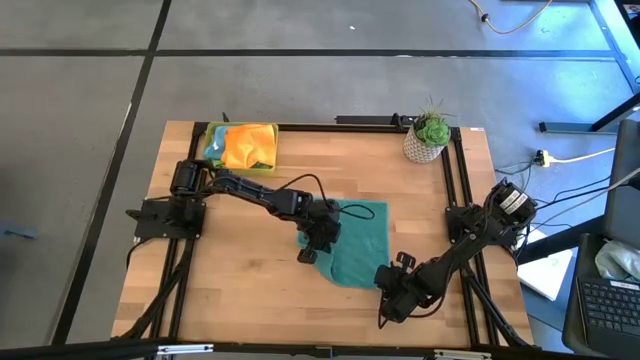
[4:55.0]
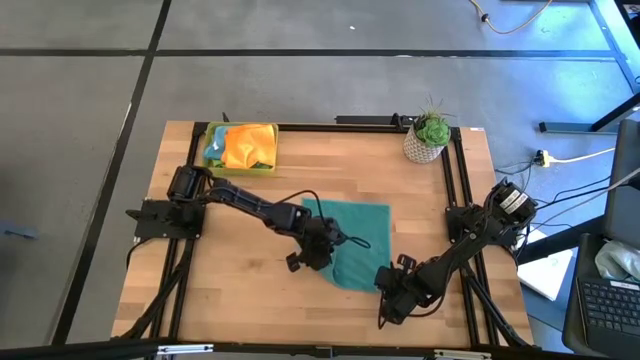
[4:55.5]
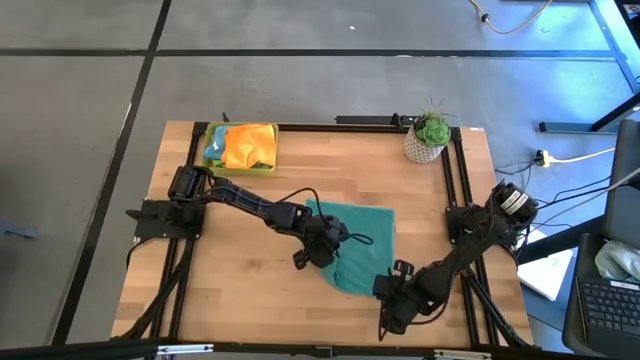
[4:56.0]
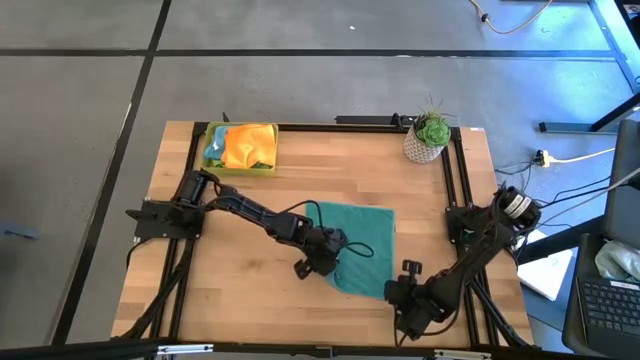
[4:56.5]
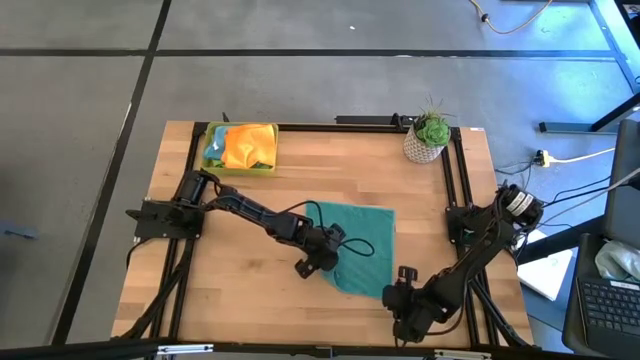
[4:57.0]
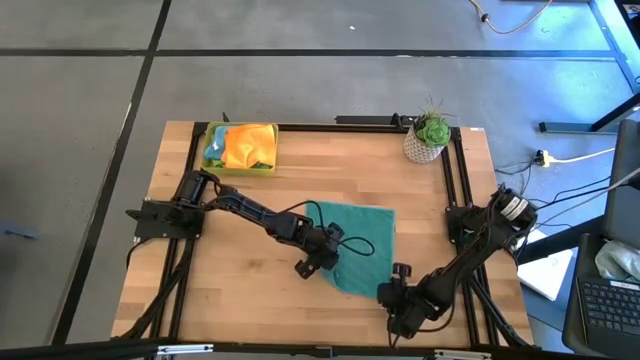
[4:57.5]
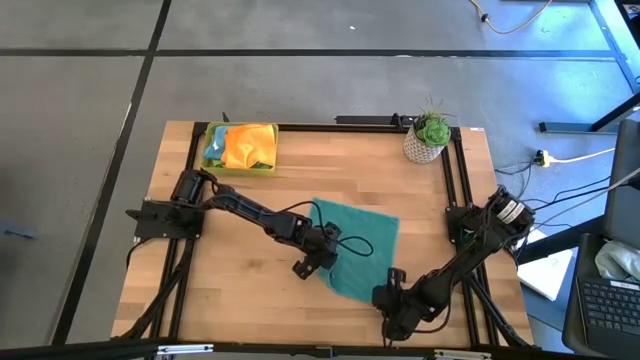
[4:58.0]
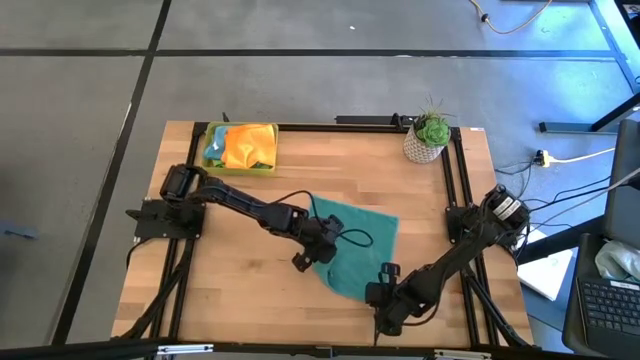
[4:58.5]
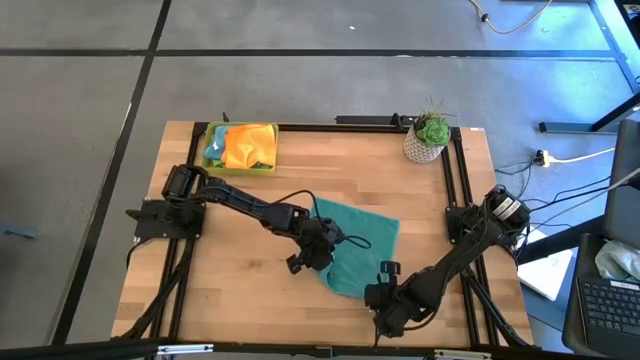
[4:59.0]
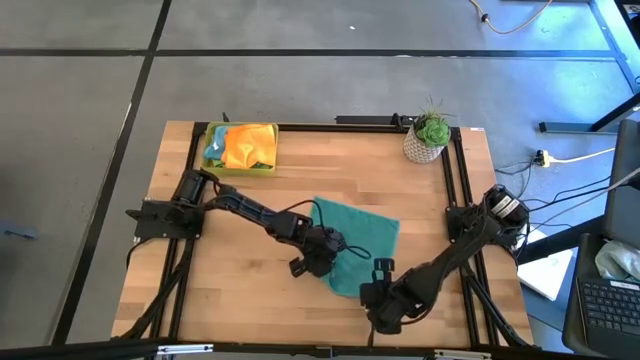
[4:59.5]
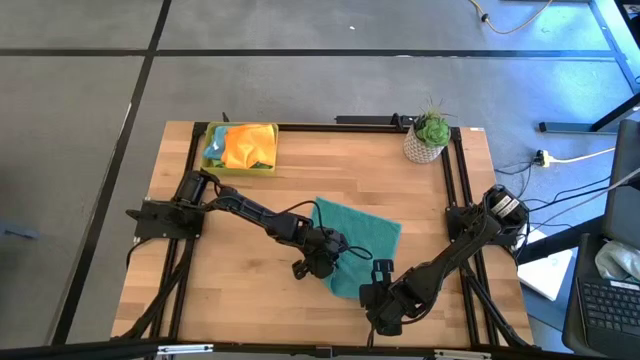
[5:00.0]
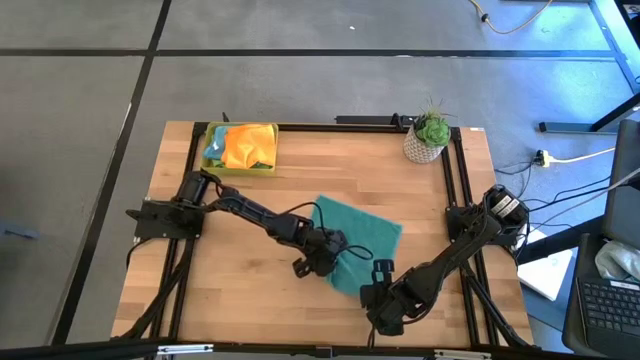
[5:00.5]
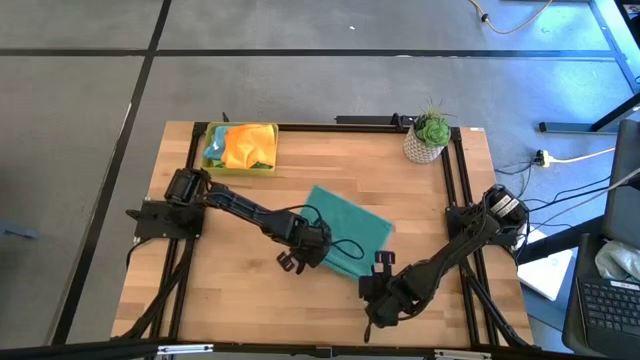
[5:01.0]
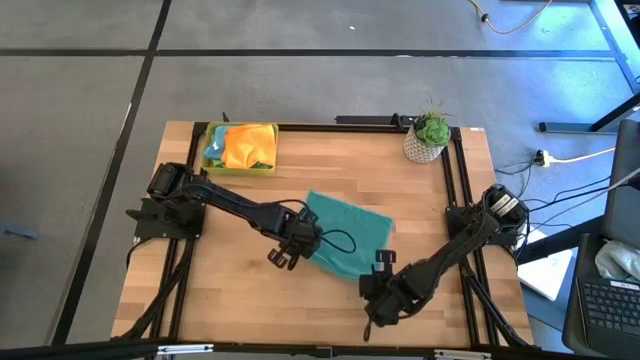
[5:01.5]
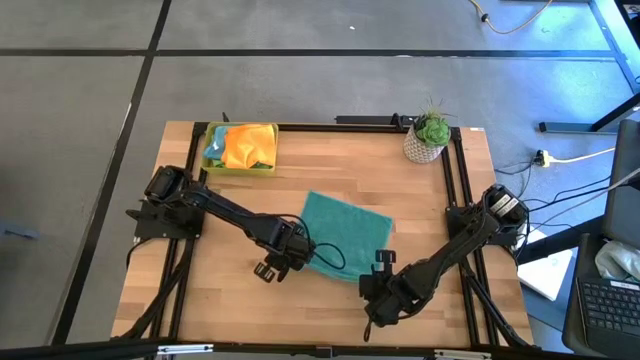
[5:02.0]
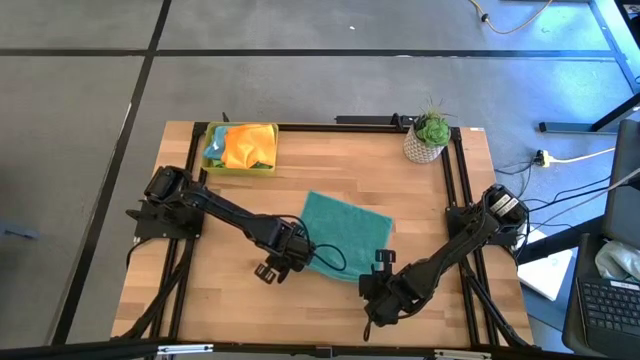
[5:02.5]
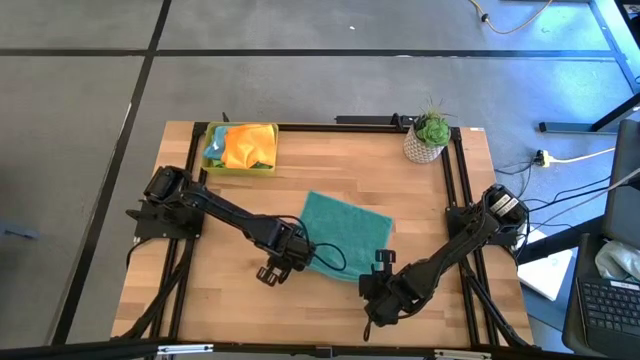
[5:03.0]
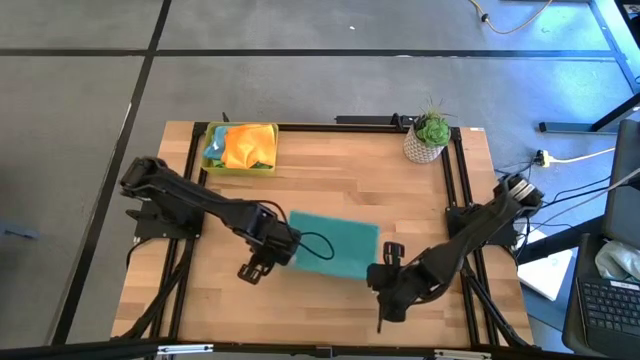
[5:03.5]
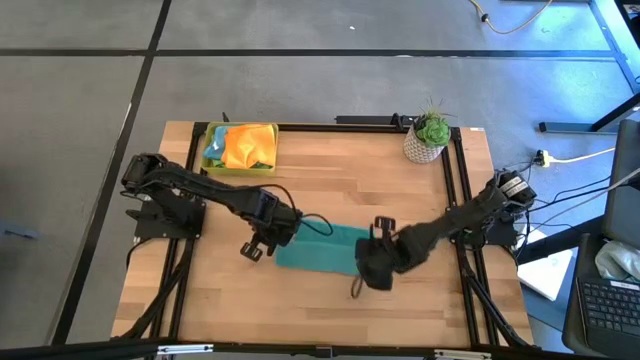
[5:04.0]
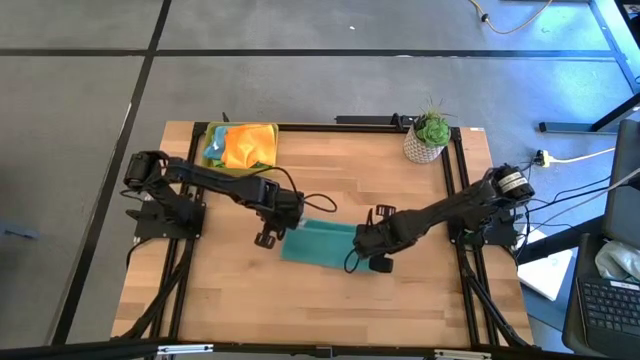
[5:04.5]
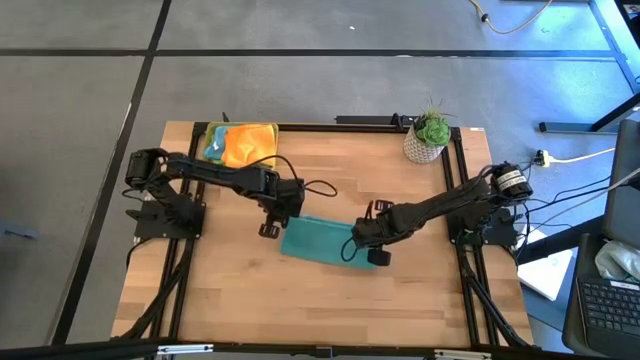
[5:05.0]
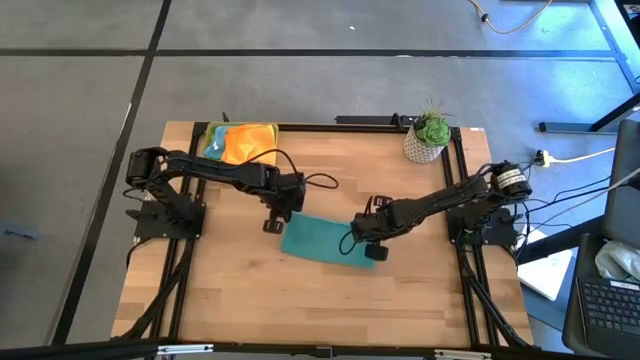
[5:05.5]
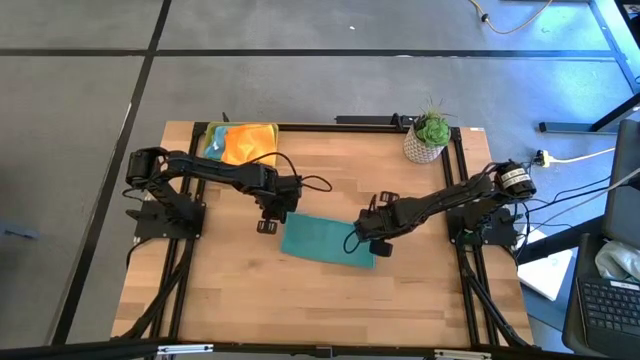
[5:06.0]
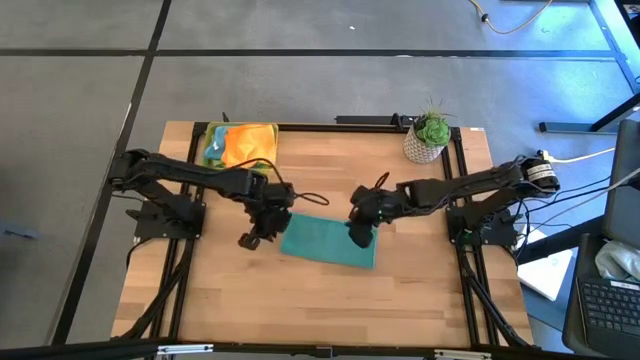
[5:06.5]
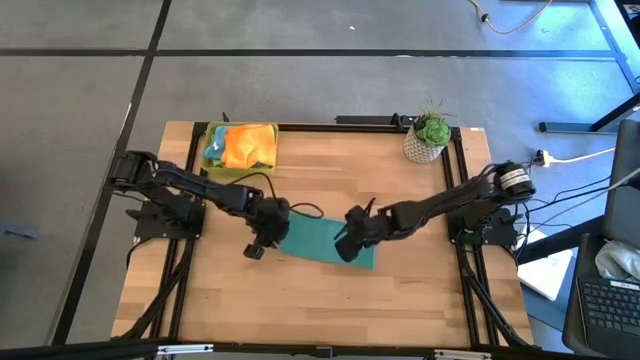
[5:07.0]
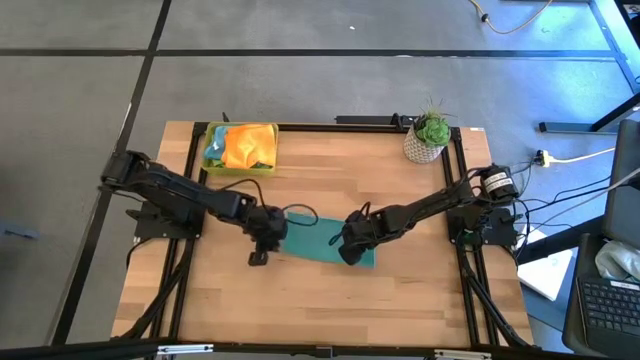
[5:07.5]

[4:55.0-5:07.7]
Task: Fold microfiber towels
Fold the blue towel

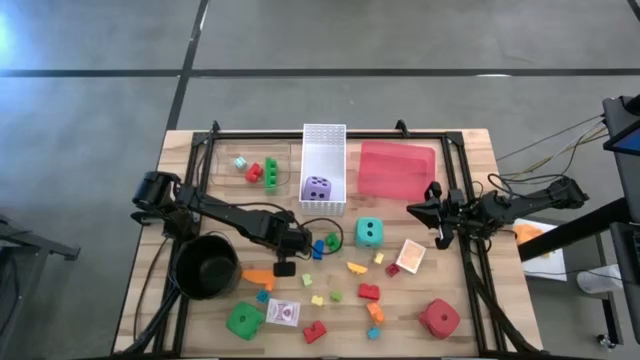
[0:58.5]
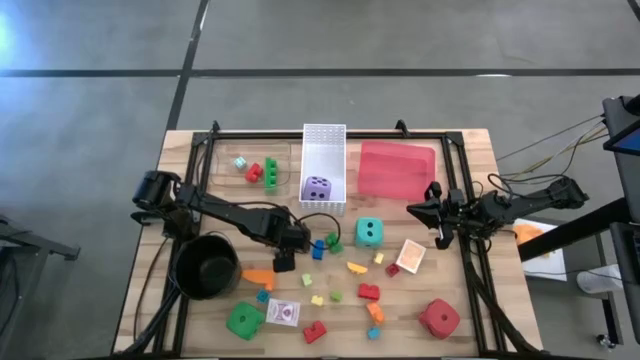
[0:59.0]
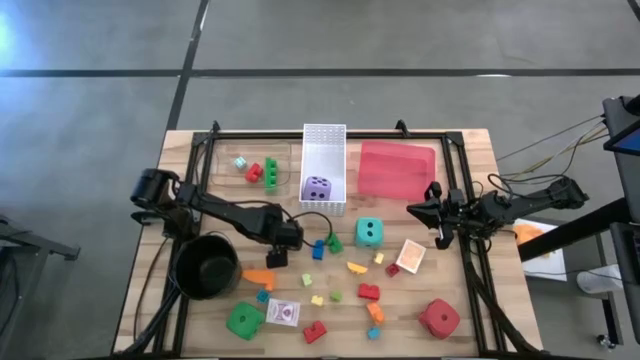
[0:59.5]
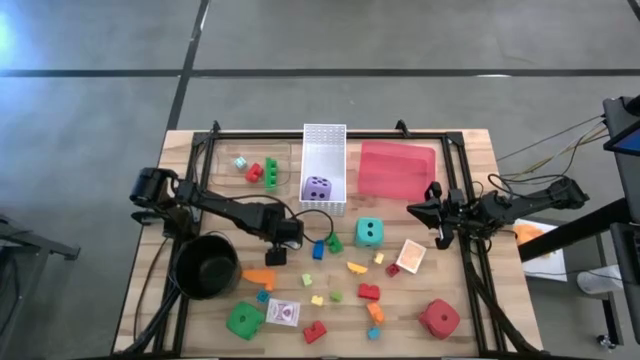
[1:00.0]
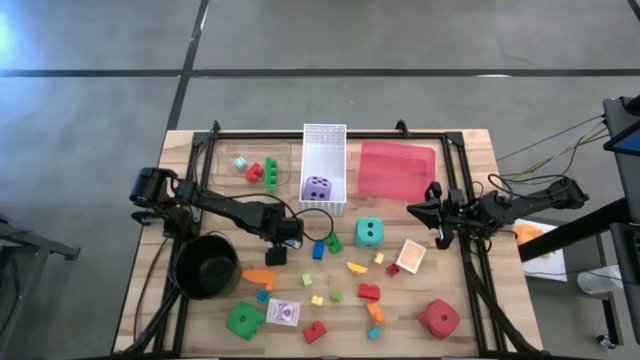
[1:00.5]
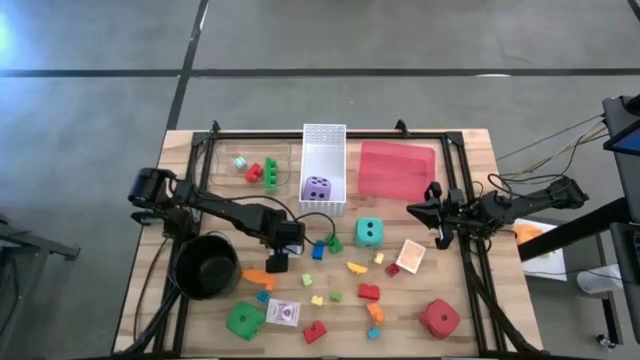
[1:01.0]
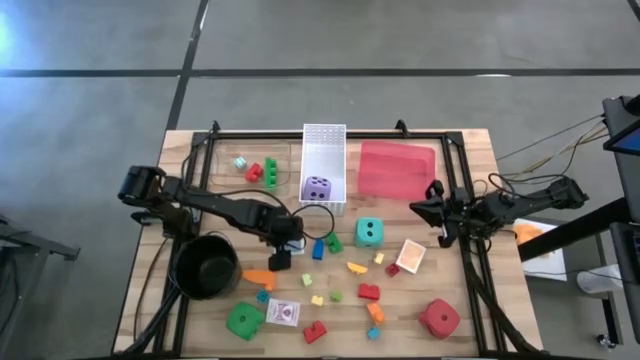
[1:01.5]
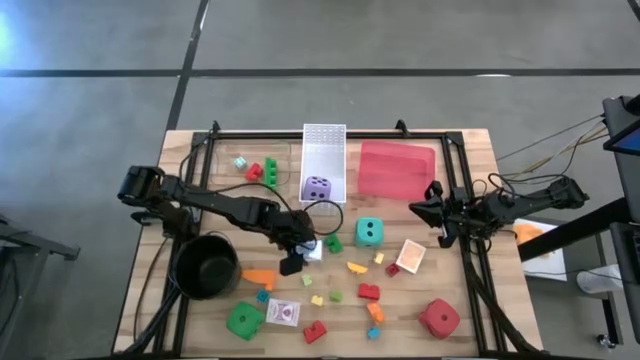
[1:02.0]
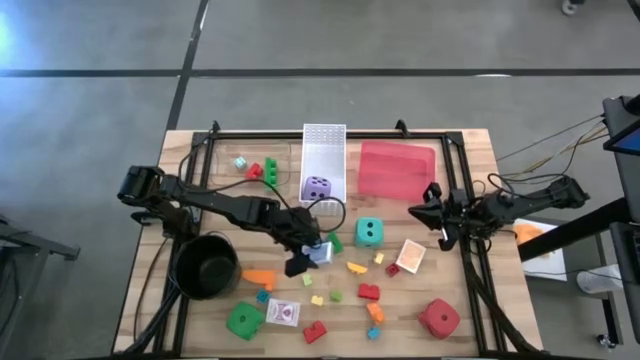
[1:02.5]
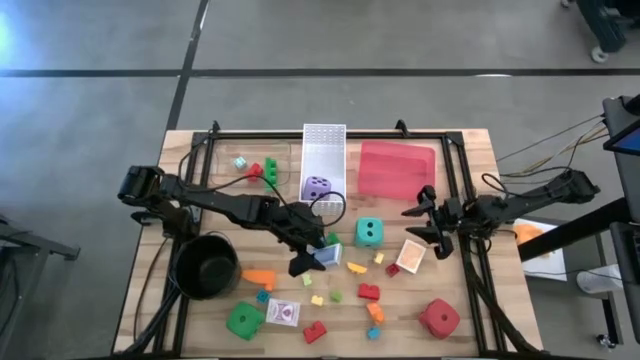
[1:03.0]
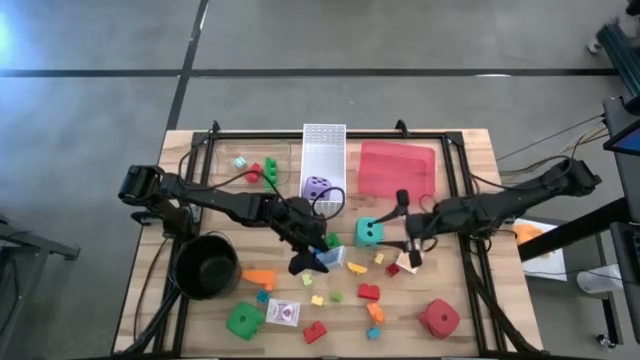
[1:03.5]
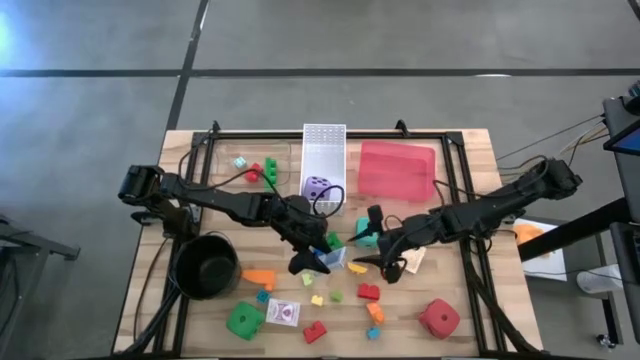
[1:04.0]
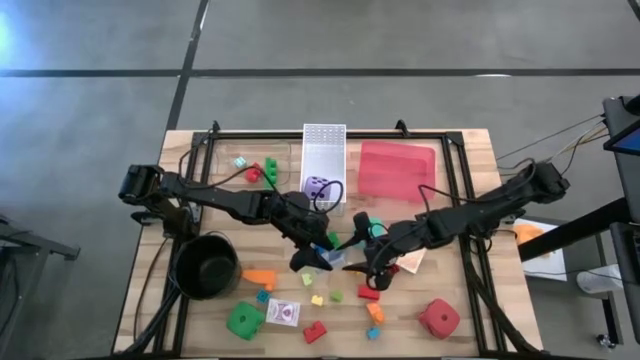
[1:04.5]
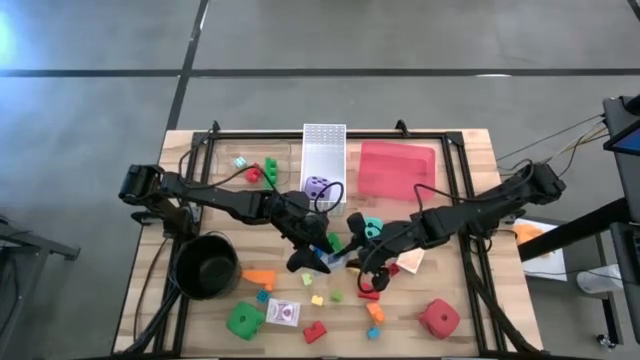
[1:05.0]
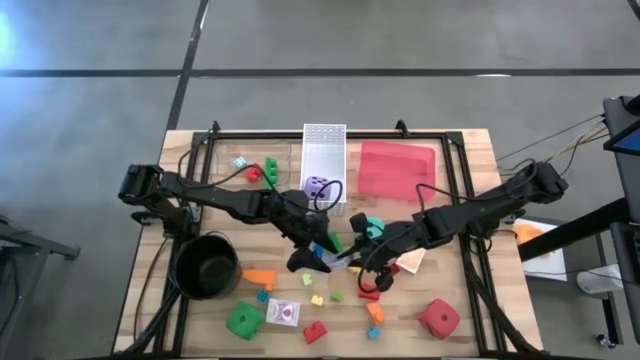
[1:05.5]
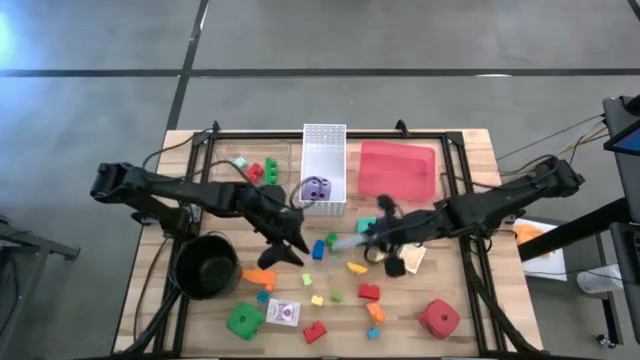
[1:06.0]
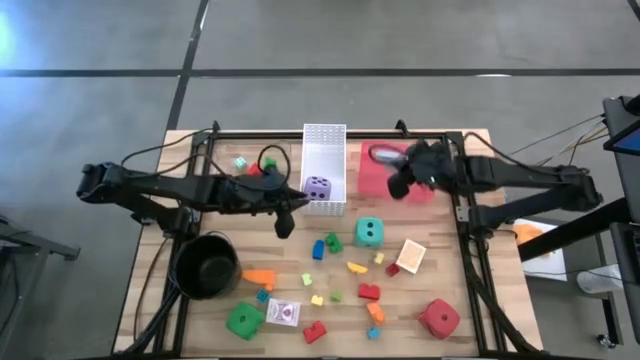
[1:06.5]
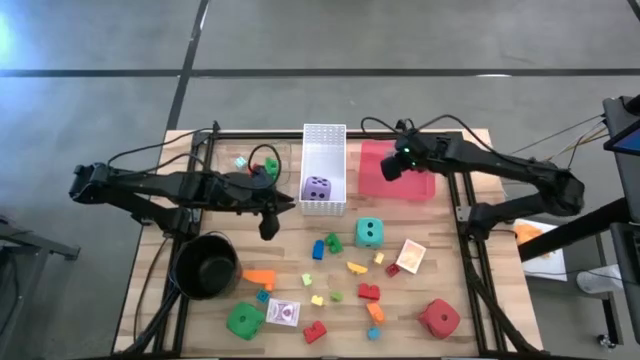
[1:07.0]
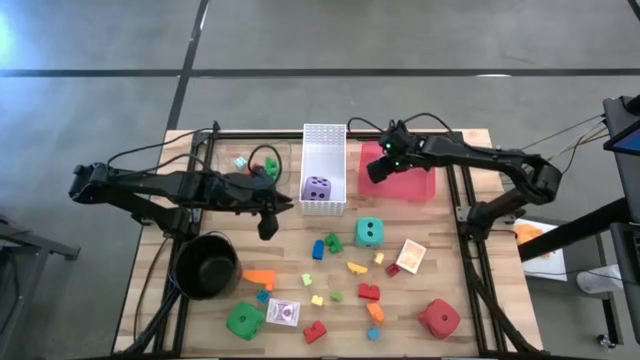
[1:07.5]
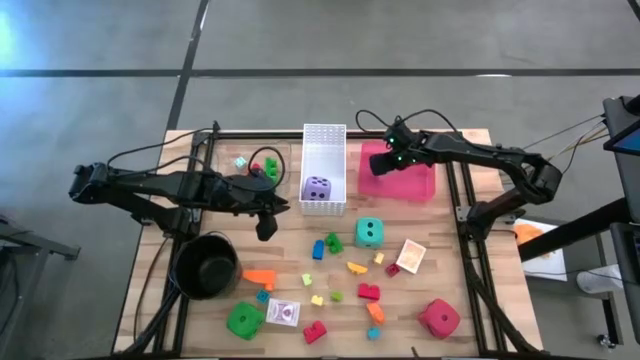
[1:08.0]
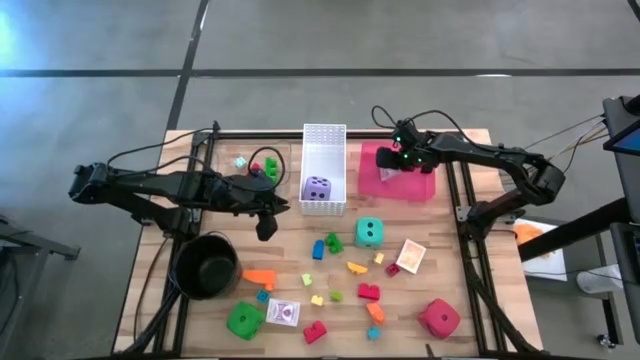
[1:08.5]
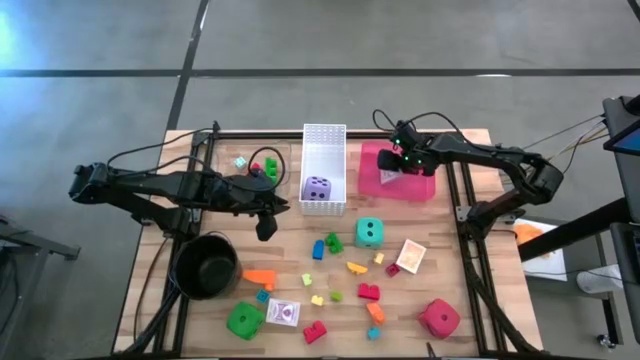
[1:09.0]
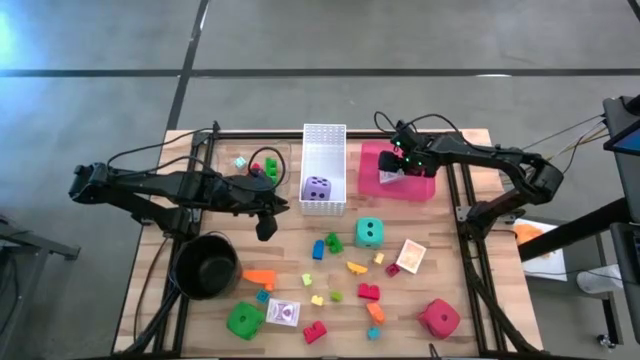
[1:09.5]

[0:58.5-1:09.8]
Task: Pick & Place Toys
Put the blue deck of cards into the red bin
